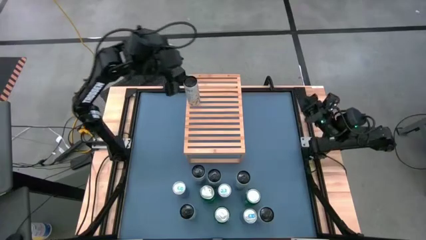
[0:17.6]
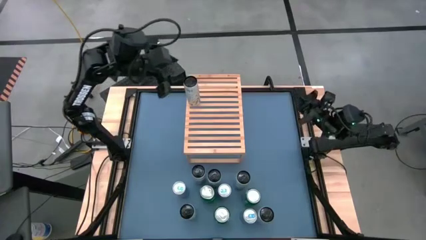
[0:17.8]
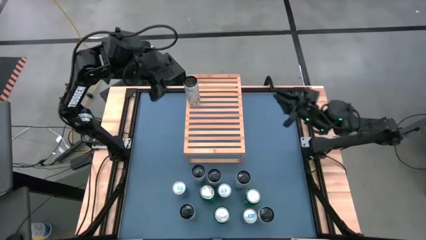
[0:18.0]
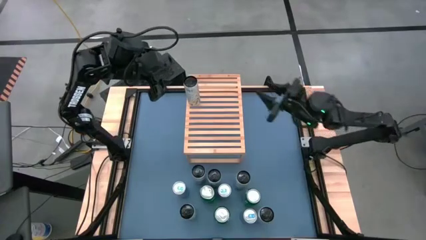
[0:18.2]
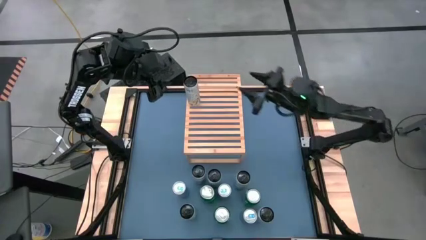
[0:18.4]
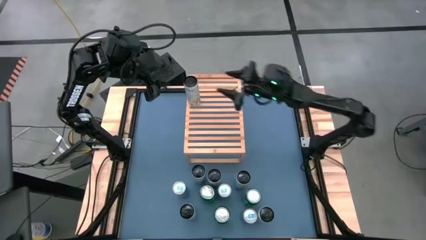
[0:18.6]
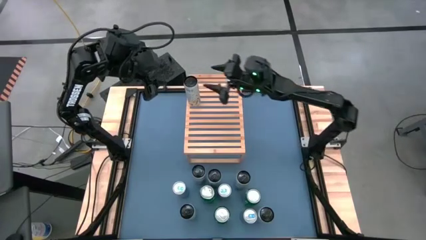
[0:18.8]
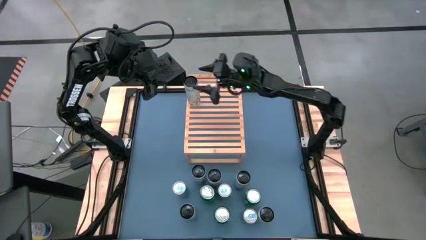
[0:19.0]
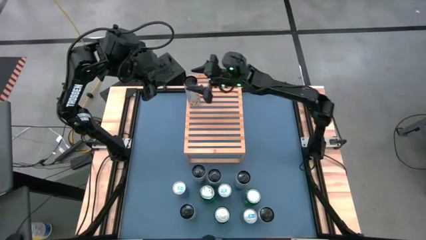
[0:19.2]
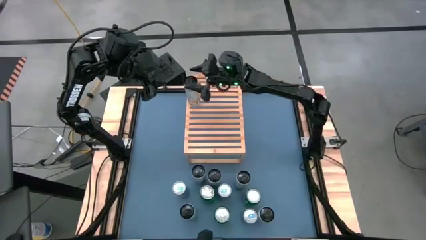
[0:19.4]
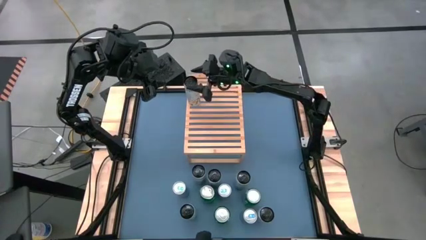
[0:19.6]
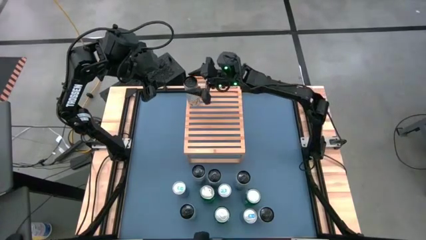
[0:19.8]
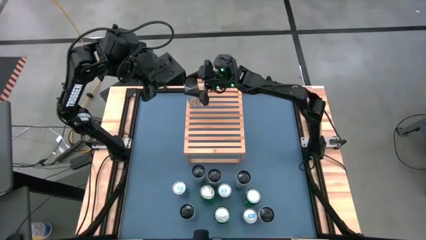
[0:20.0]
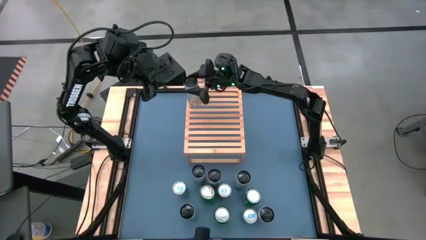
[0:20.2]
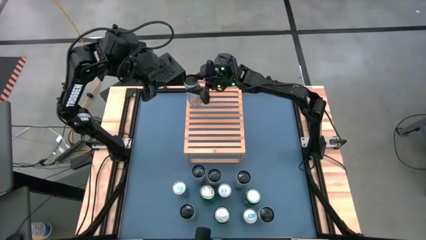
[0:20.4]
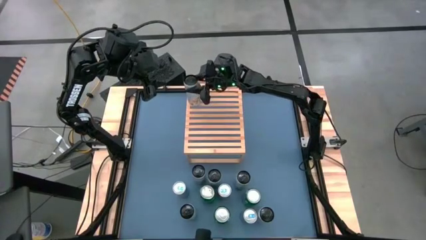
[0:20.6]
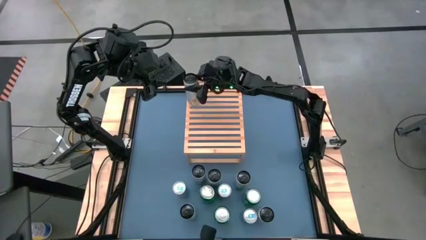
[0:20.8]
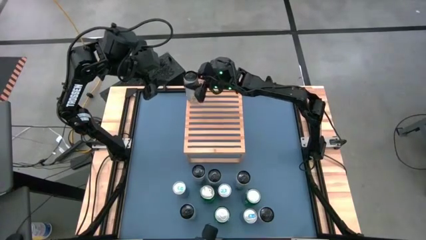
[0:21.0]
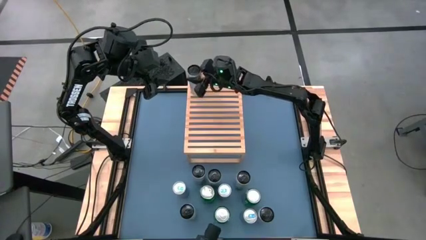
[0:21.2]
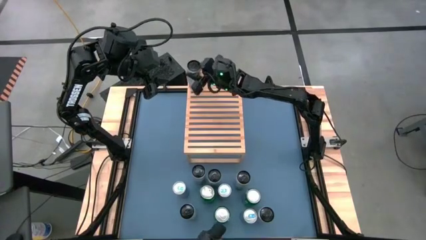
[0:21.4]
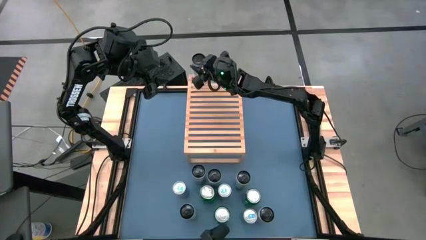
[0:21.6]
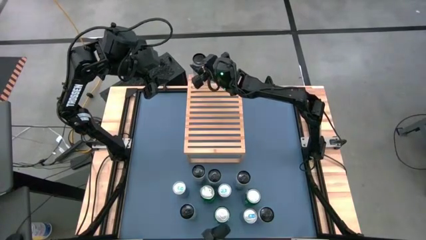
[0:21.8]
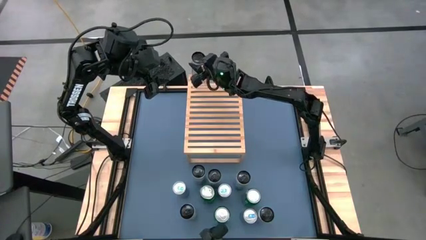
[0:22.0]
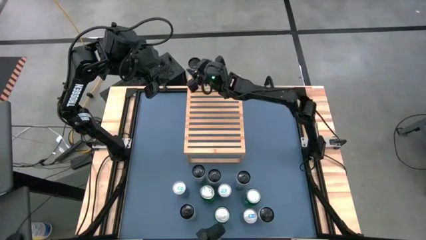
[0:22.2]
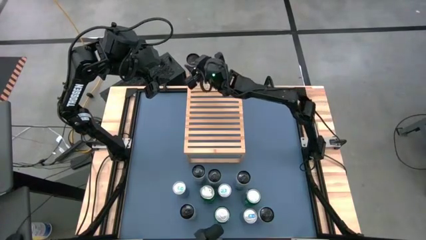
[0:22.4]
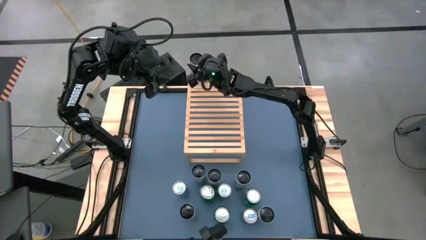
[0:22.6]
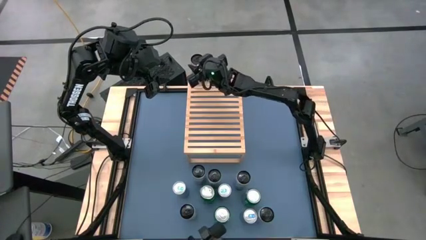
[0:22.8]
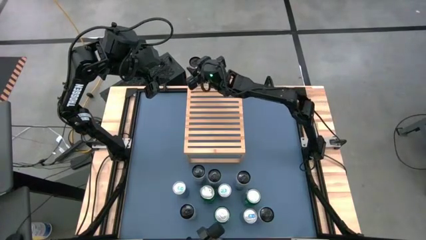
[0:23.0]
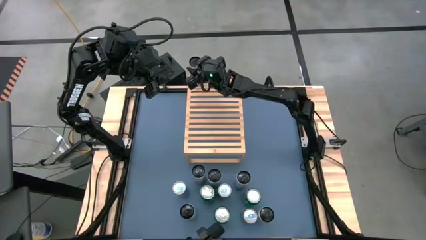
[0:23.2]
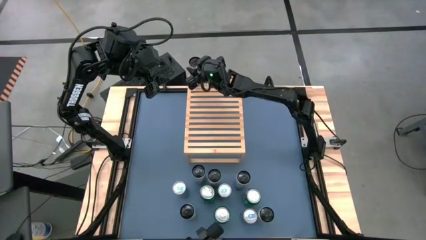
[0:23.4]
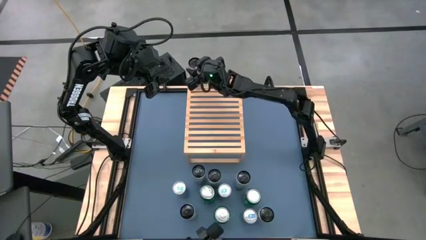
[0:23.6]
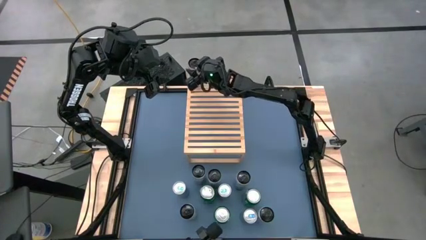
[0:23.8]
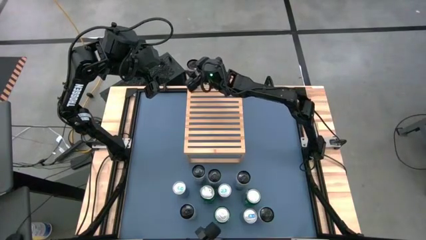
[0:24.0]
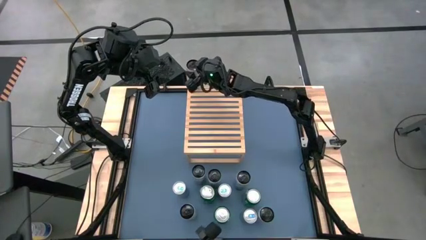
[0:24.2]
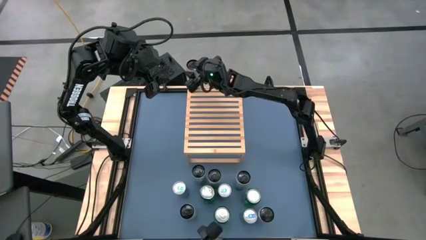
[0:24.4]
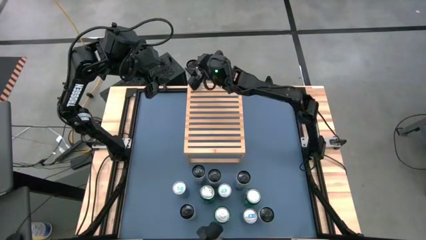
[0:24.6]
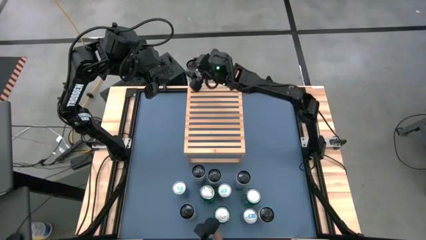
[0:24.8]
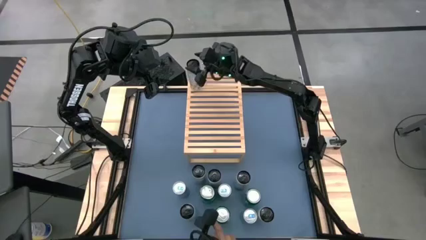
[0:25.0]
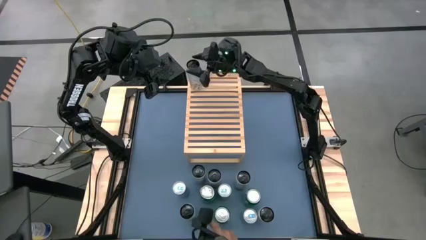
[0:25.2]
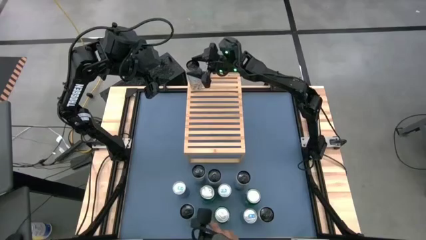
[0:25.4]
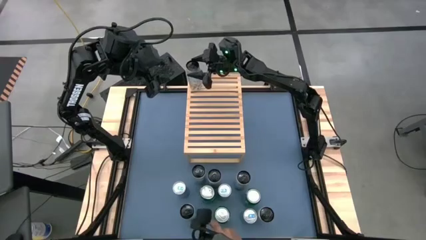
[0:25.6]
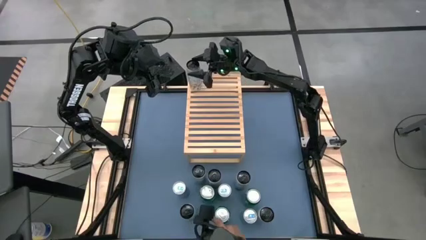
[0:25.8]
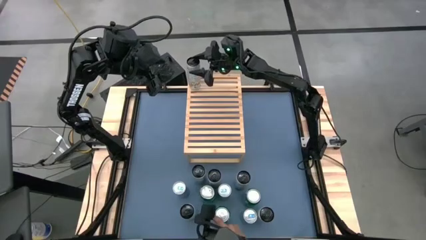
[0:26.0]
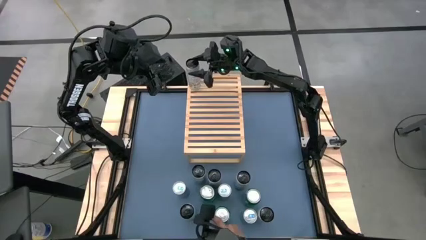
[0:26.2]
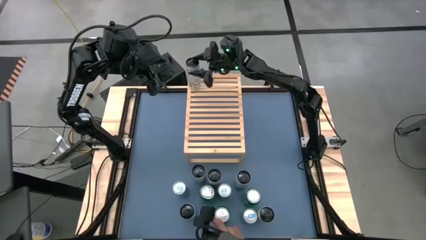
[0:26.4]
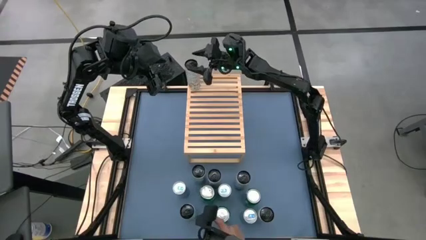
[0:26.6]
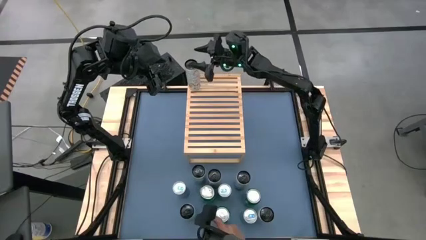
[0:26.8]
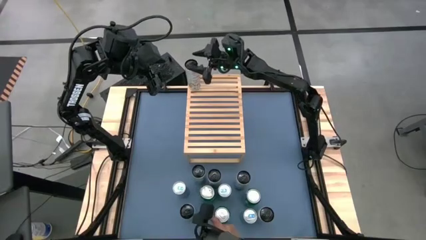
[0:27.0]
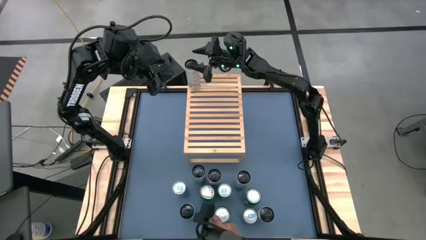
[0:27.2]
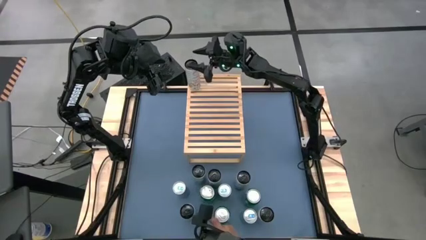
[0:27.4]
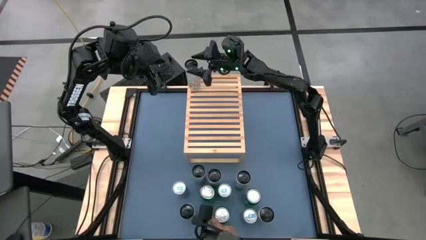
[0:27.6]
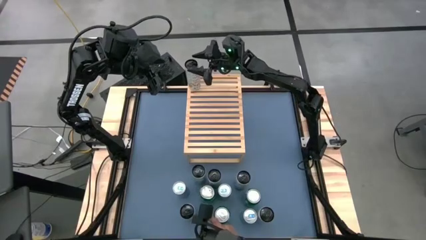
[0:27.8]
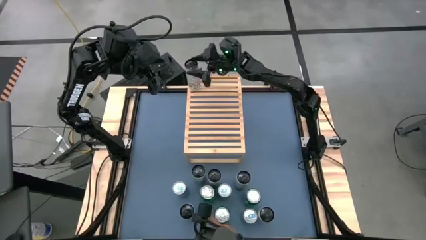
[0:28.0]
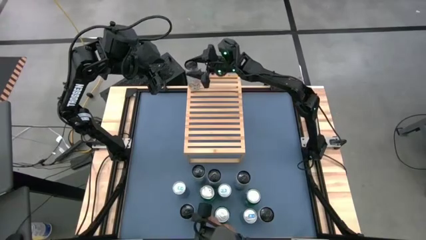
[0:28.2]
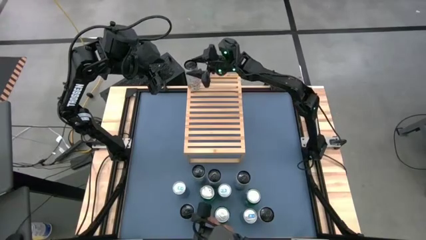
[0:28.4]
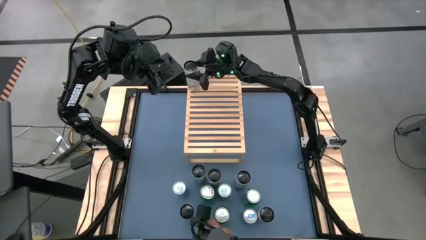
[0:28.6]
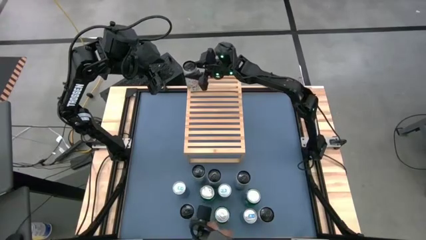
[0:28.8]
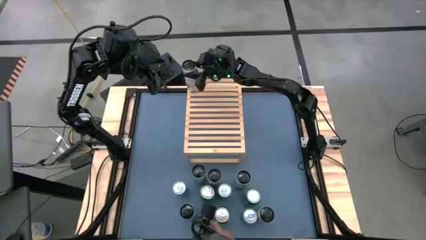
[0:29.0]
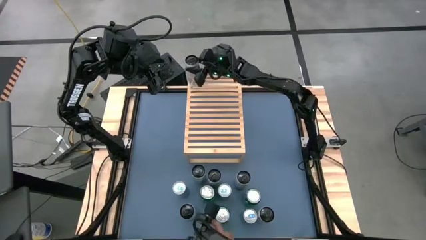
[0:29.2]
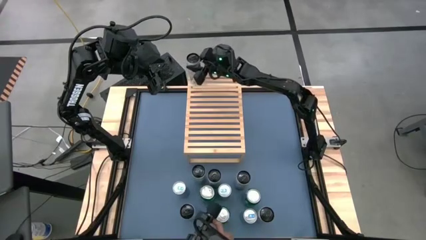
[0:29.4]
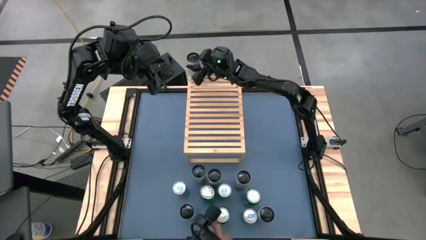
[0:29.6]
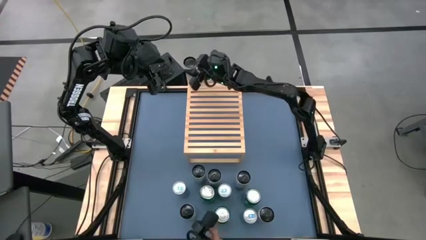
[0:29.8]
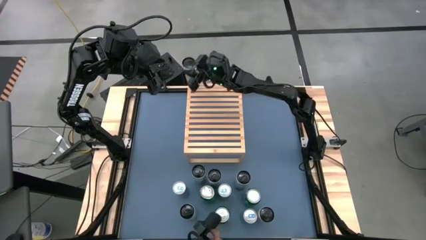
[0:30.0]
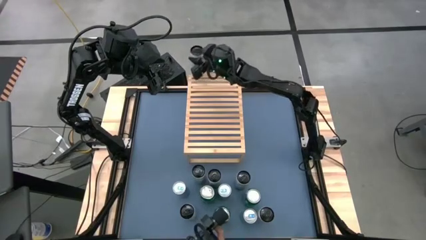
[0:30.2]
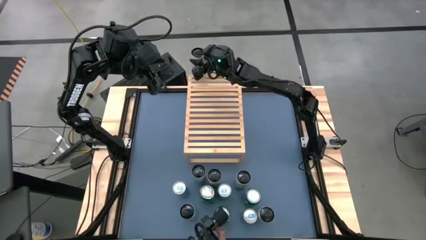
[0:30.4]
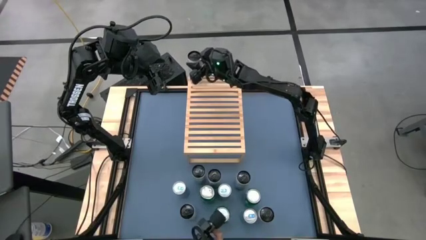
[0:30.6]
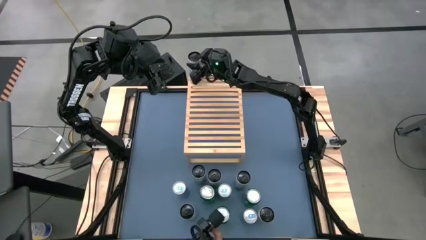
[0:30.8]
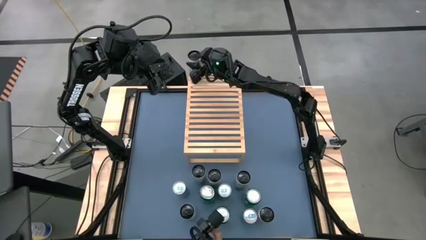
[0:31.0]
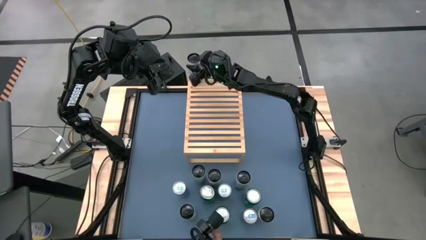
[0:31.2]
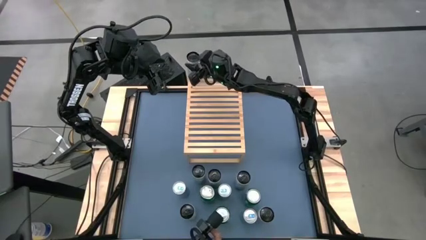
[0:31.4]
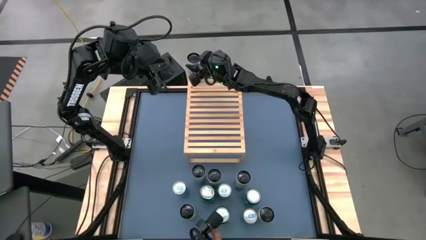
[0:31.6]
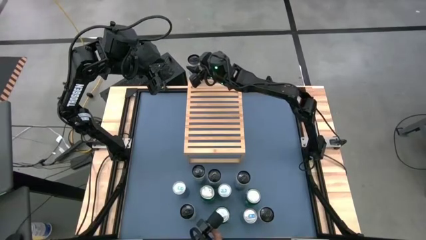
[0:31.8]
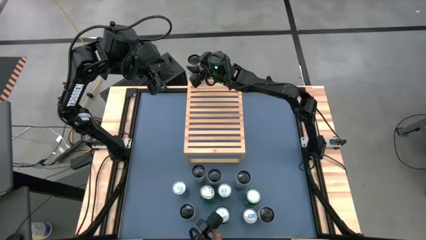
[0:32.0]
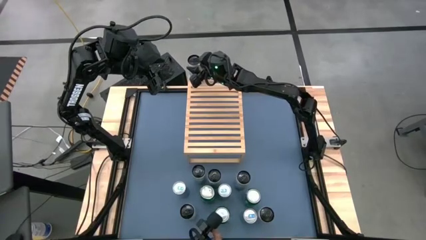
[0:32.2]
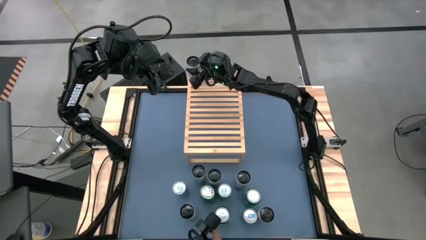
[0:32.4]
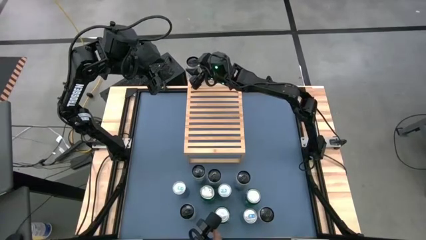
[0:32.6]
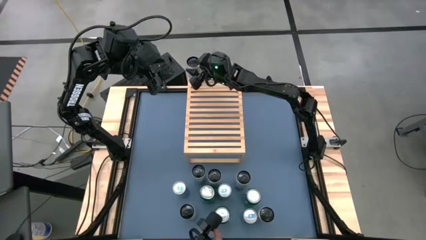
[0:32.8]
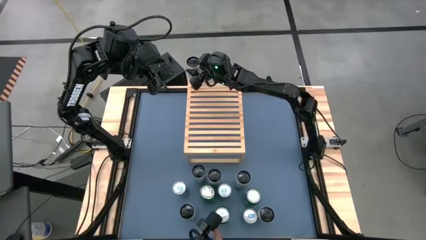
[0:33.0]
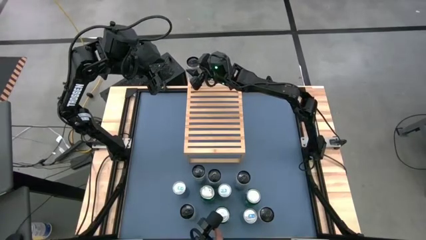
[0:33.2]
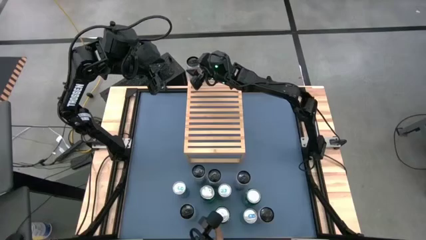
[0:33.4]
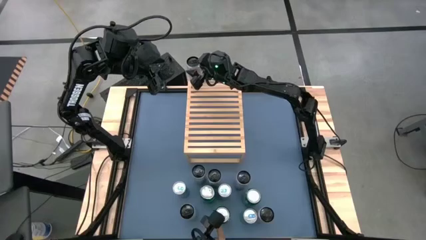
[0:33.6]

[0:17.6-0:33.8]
Task: Place canned beverage on shelf
Put the white yellow soda can on the shelf
